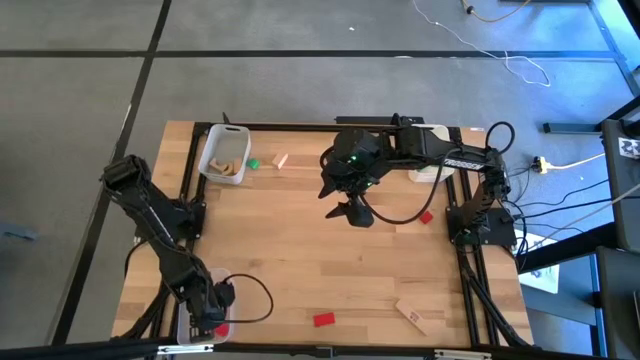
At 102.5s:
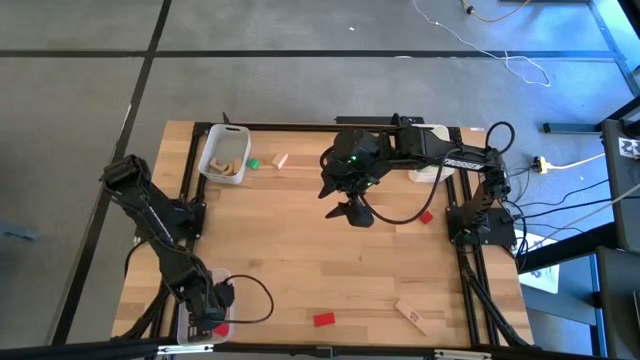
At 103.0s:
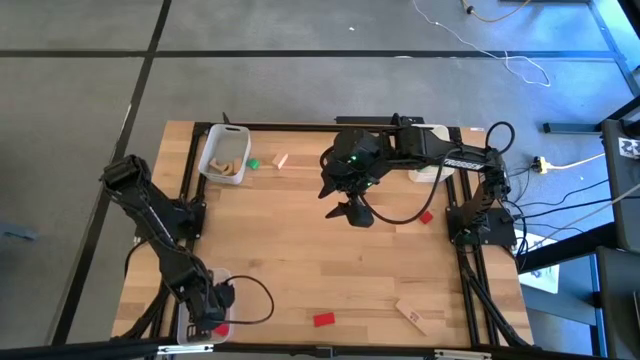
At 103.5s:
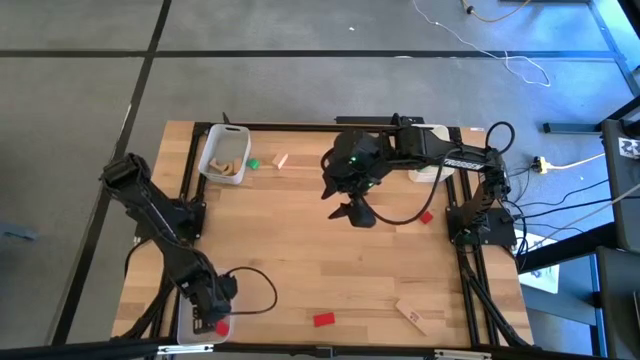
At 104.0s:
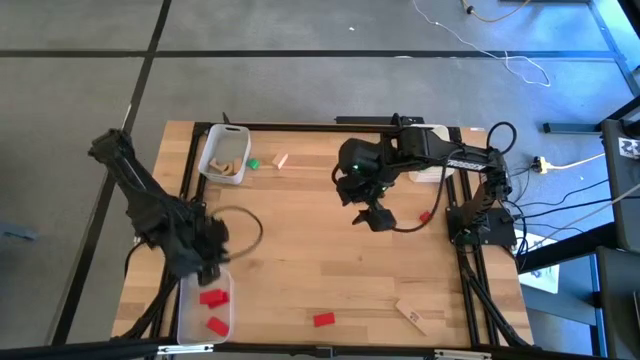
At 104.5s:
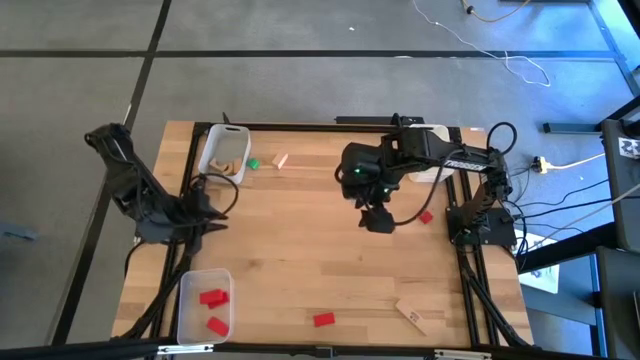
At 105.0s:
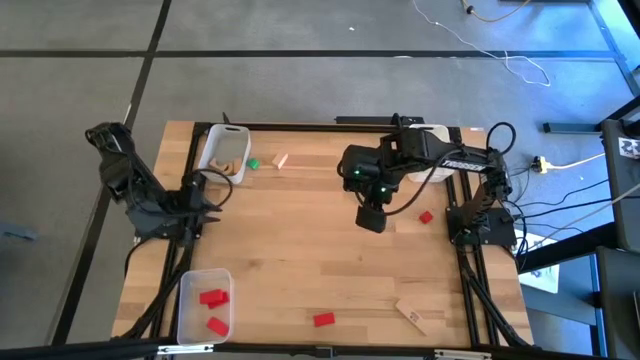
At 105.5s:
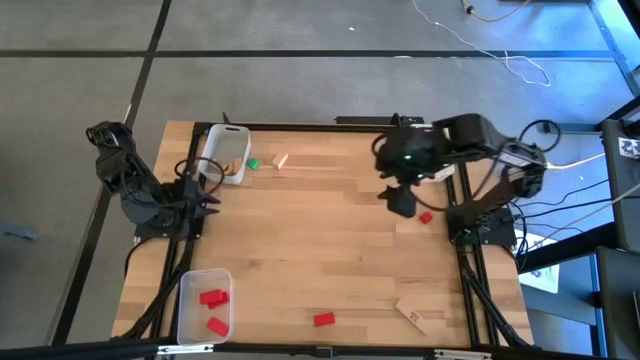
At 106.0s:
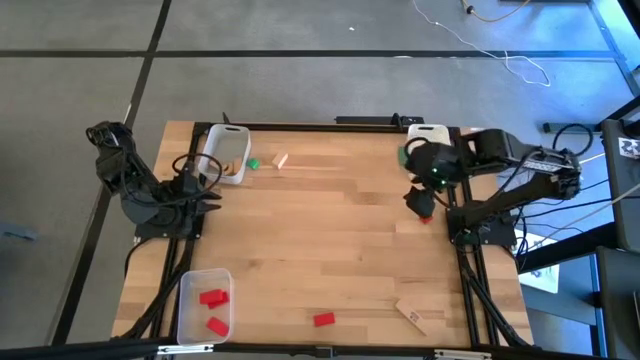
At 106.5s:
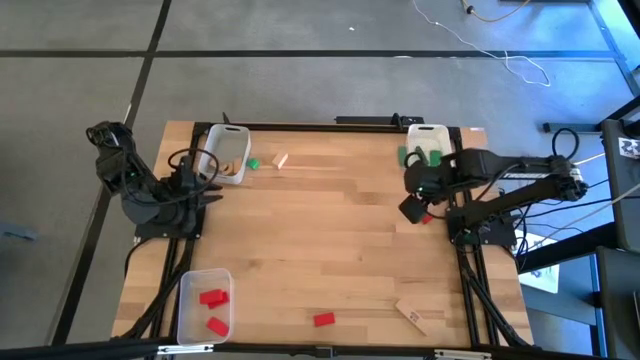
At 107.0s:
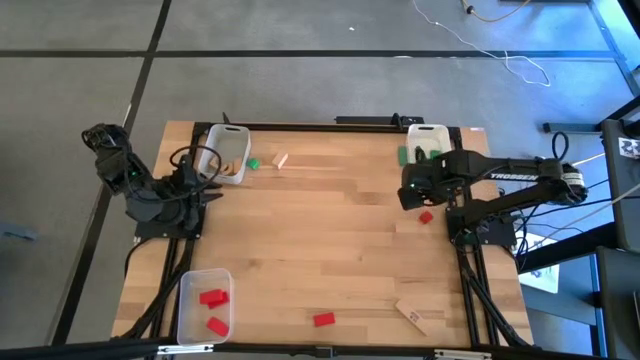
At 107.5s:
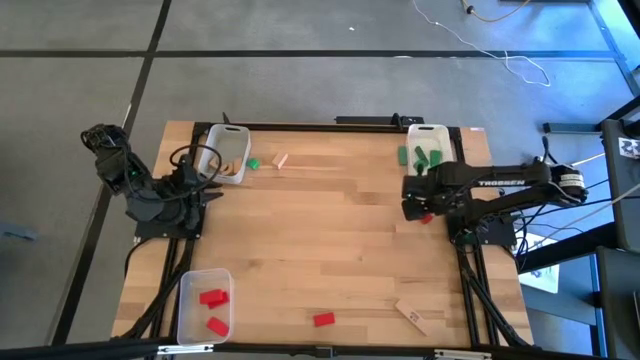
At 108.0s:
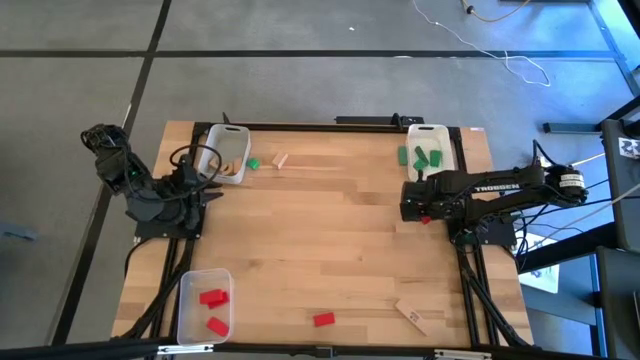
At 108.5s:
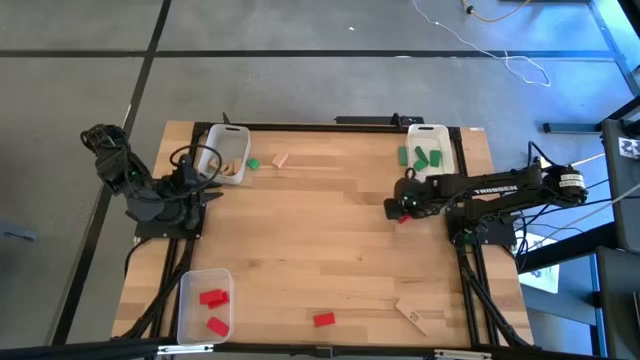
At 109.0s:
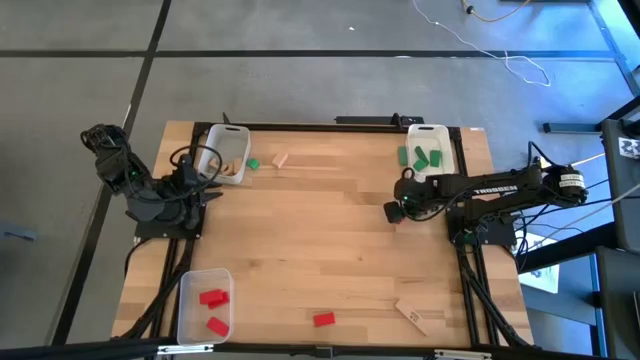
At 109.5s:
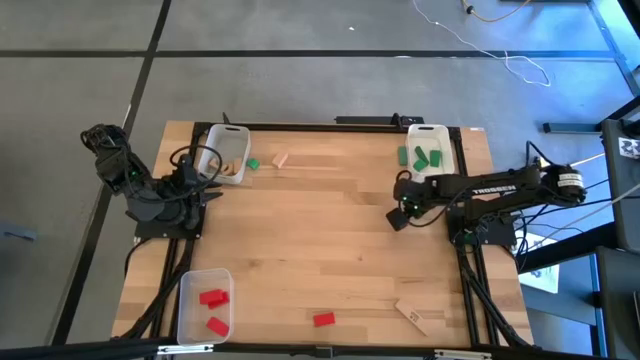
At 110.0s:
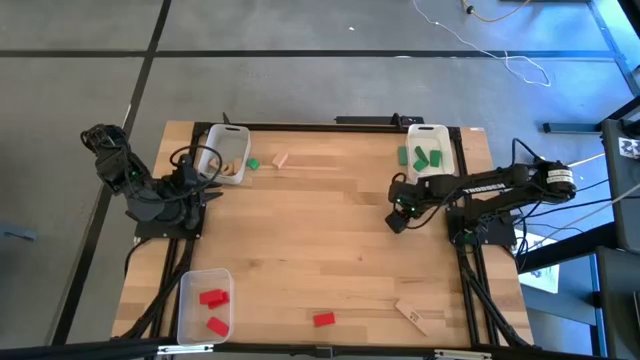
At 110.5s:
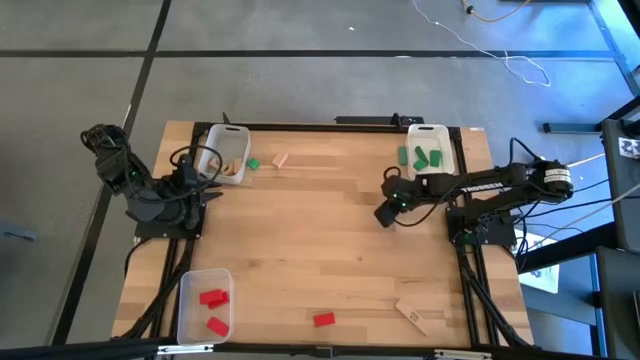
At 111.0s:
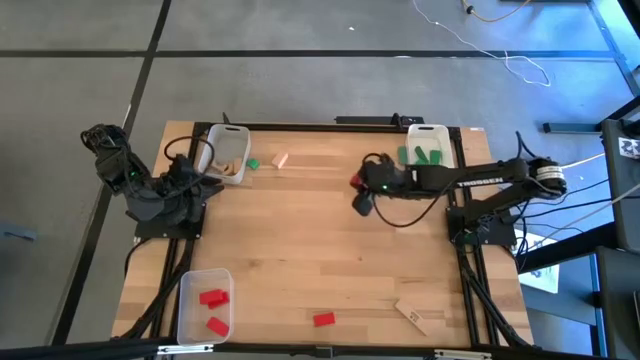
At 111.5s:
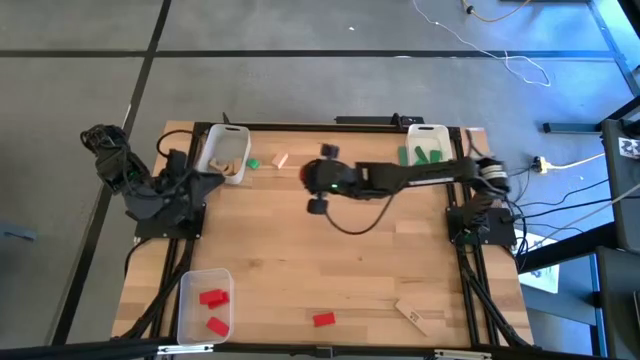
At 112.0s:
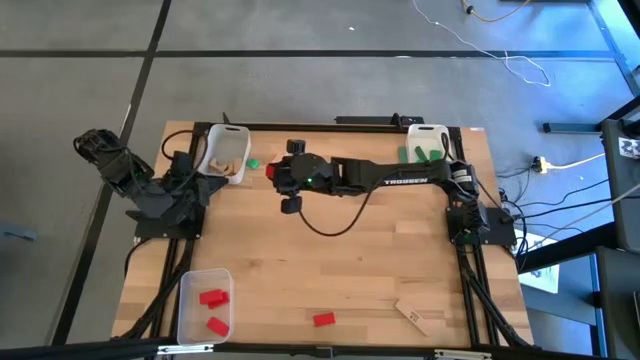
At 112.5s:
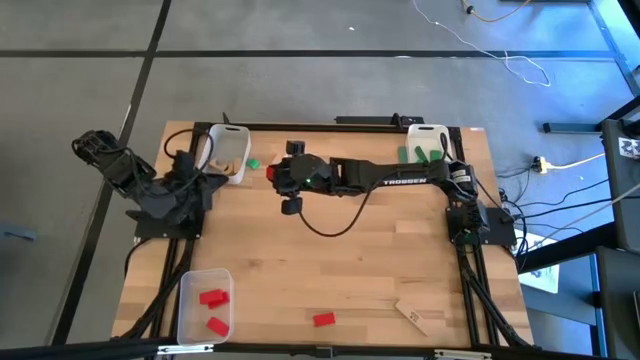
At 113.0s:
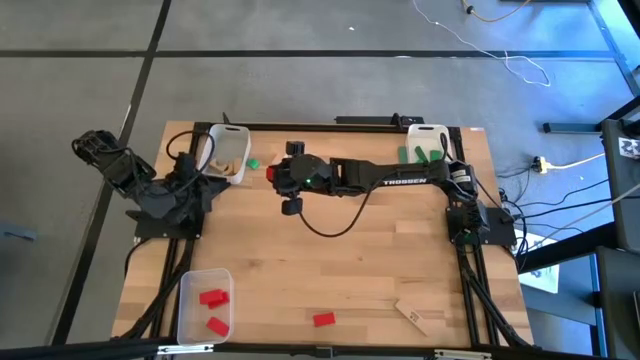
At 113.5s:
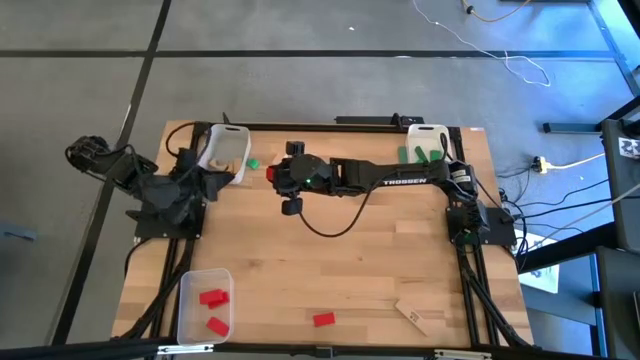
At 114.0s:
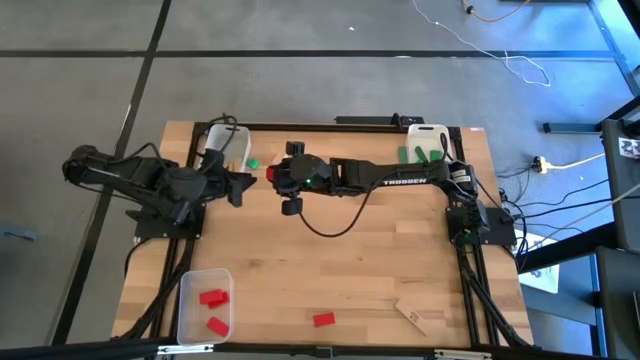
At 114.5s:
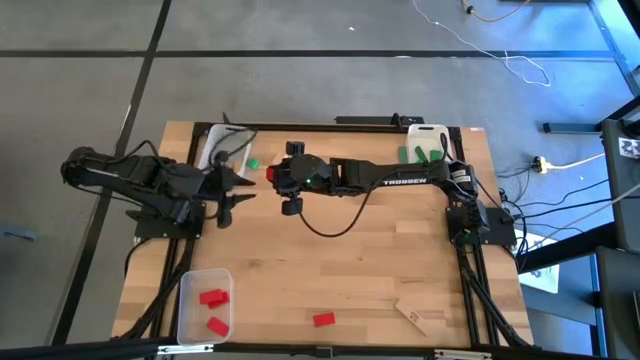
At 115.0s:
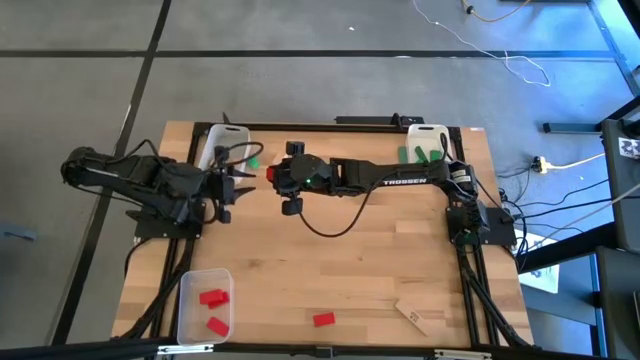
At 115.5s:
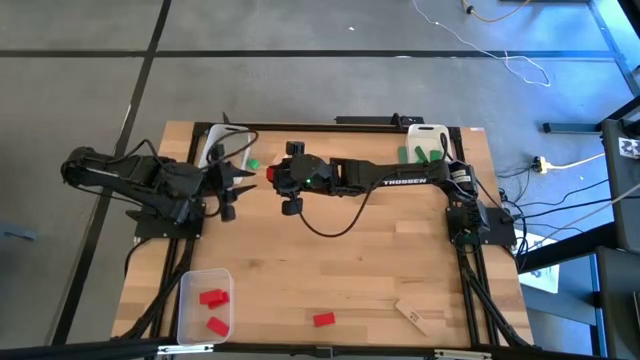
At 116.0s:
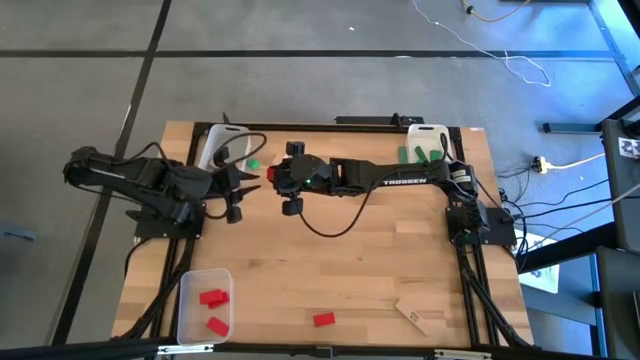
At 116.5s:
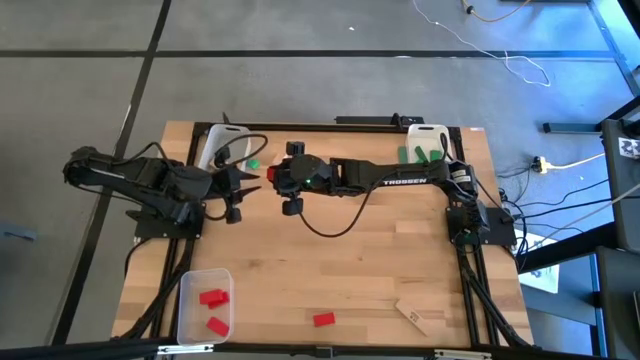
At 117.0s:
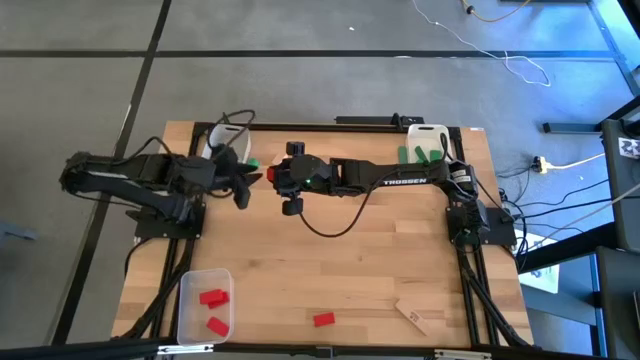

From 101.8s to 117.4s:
Task: Sort & place blocks by color
Put the red block into the transparent bin

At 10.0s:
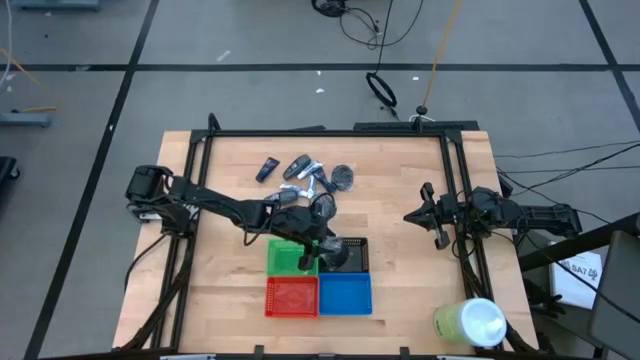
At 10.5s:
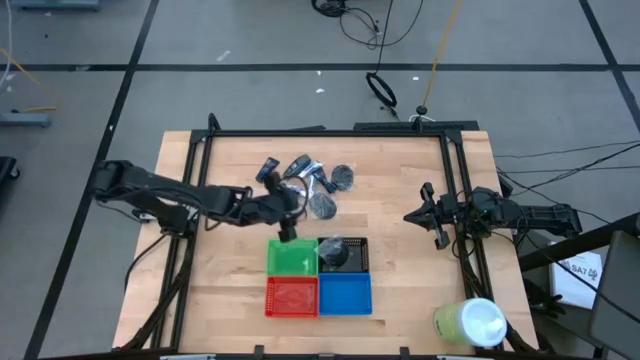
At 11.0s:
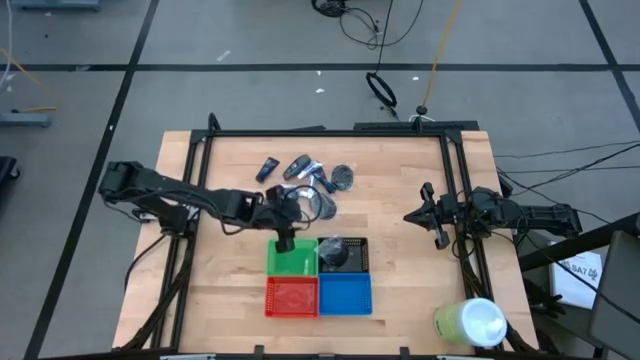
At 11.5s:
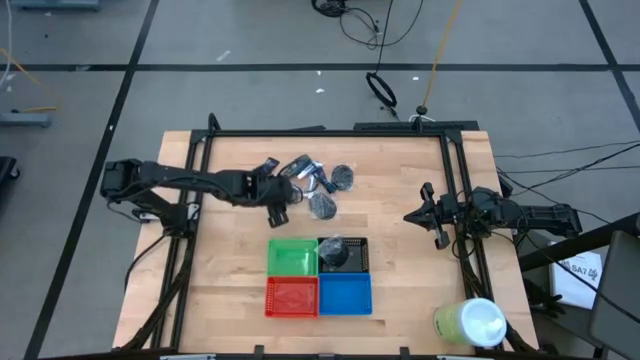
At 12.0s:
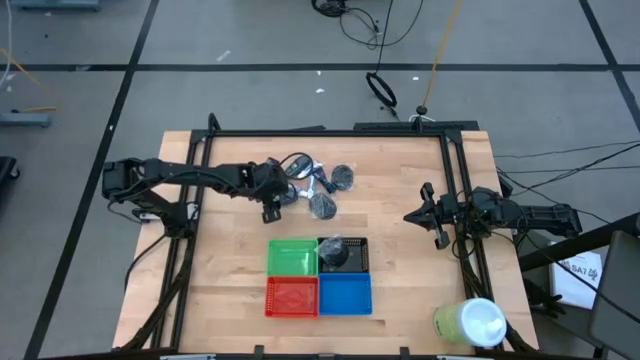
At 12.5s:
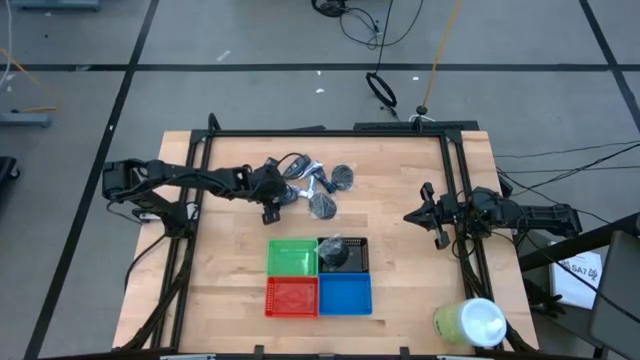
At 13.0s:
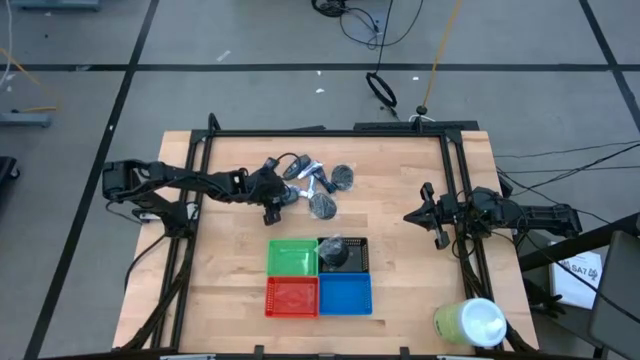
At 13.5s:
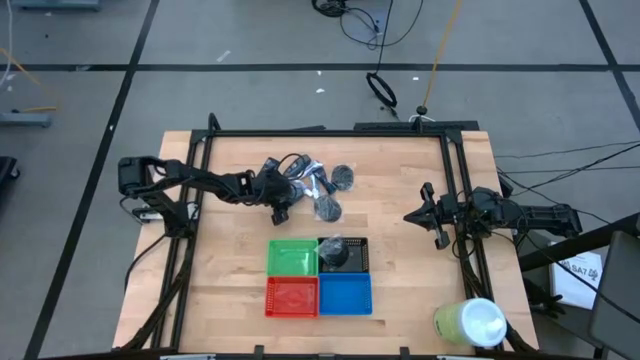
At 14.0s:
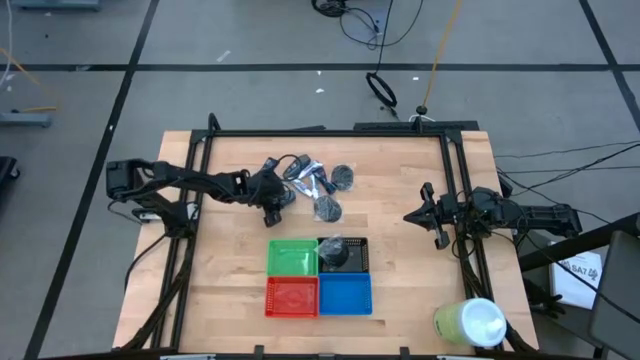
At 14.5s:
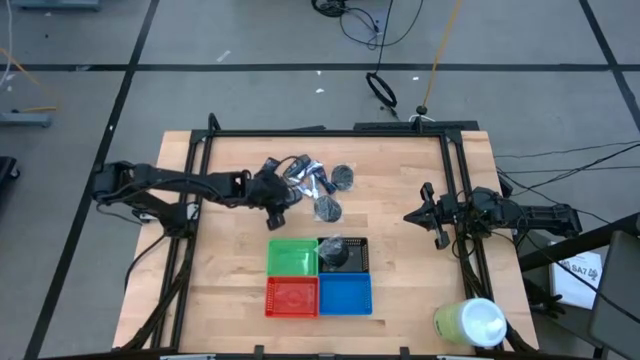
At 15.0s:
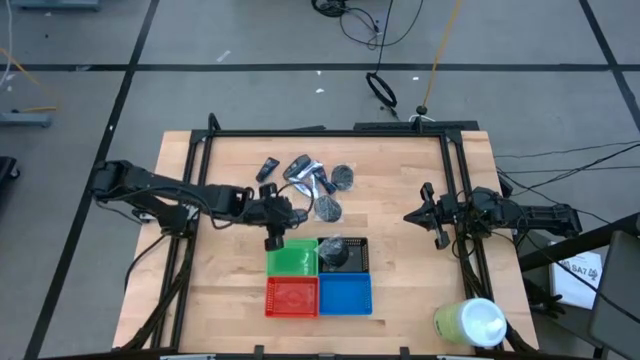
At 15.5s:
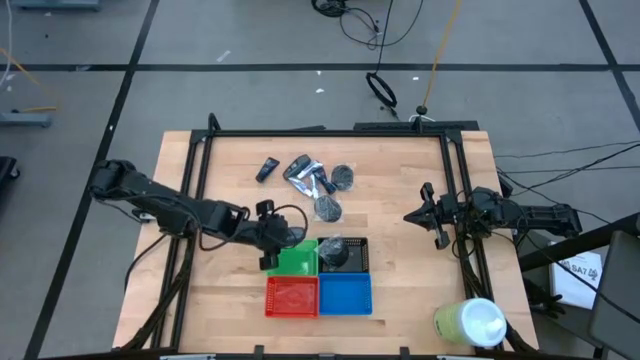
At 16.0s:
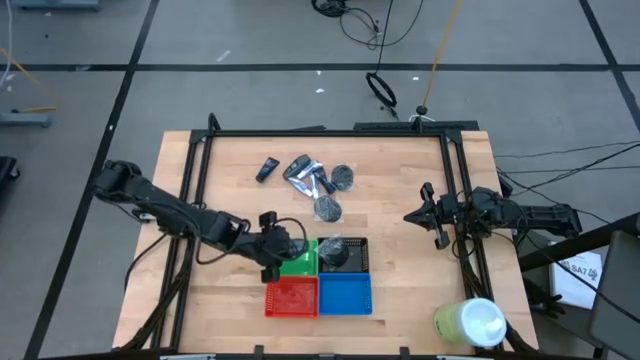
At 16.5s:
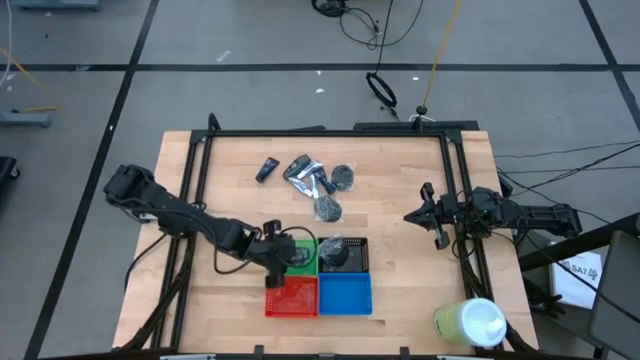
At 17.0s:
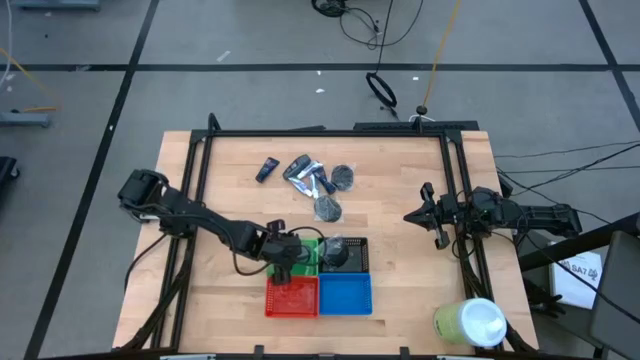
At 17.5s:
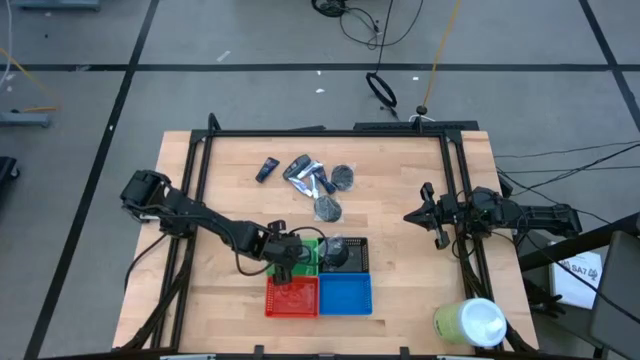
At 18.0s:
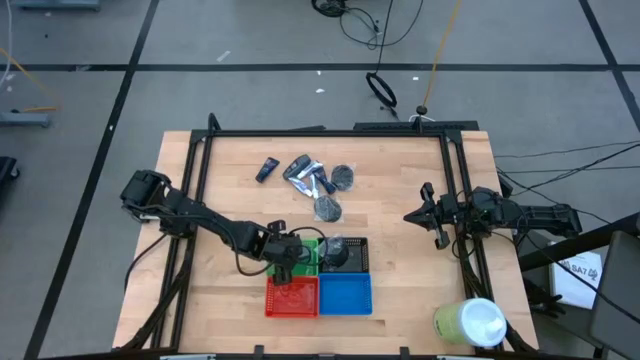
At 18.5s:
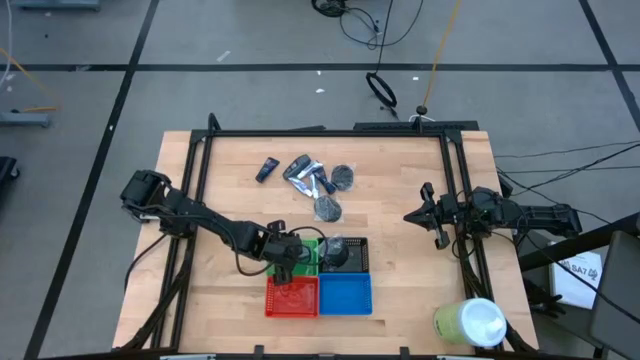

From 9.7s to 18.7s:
Task: Pick & Place Travel size toiletries
Put the bottom black deodorant into the green bin
